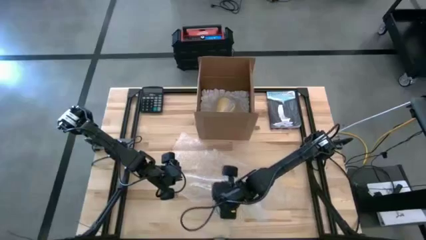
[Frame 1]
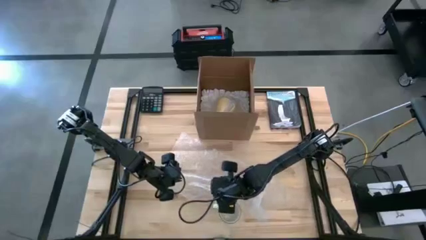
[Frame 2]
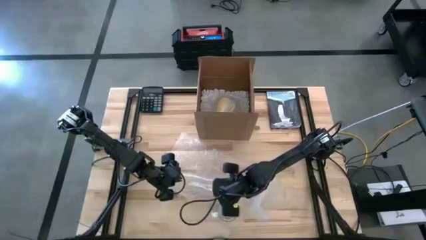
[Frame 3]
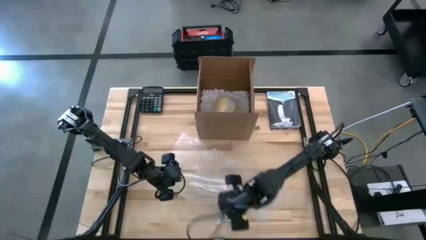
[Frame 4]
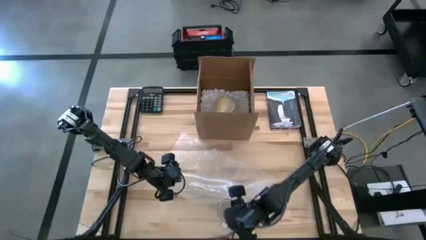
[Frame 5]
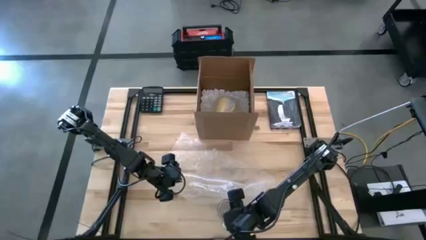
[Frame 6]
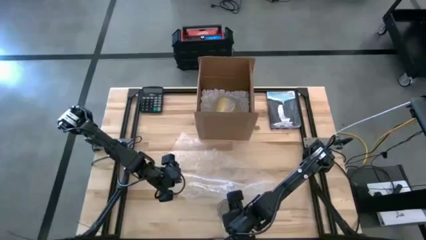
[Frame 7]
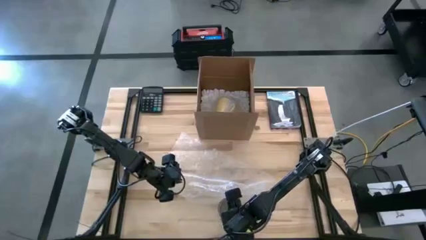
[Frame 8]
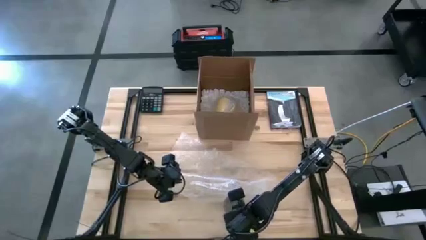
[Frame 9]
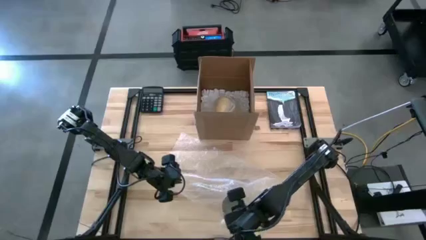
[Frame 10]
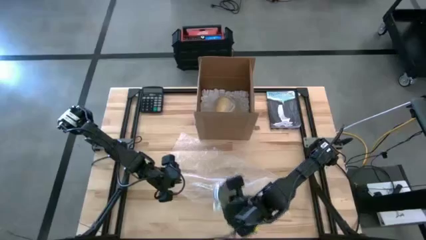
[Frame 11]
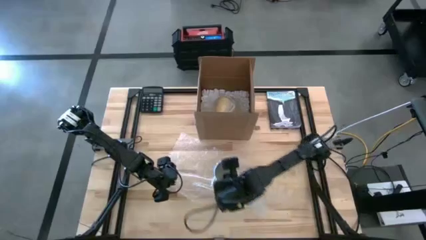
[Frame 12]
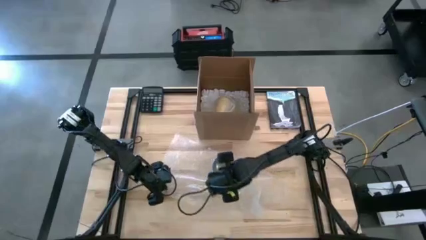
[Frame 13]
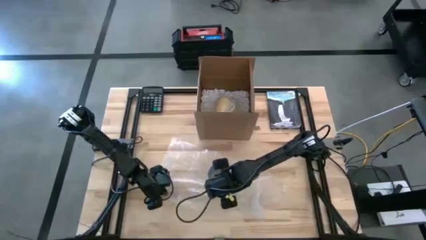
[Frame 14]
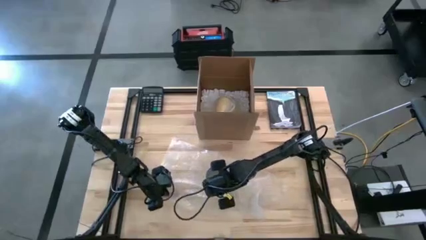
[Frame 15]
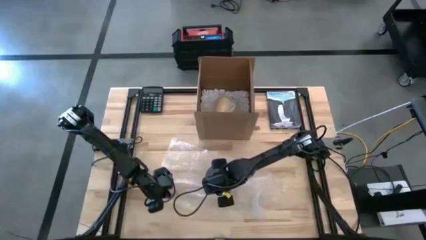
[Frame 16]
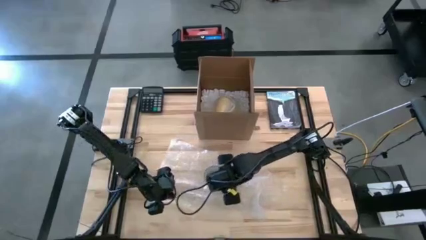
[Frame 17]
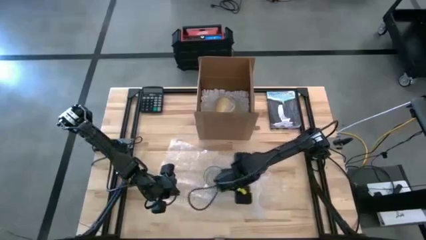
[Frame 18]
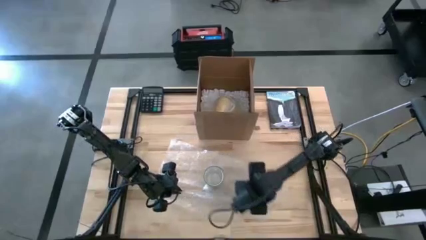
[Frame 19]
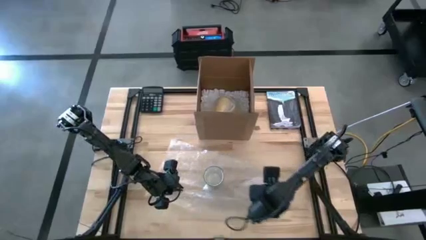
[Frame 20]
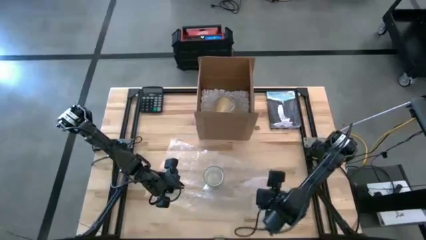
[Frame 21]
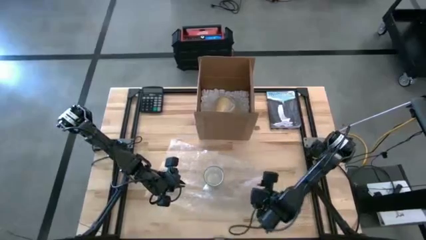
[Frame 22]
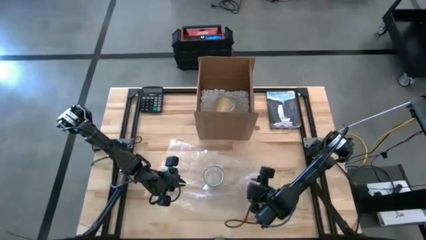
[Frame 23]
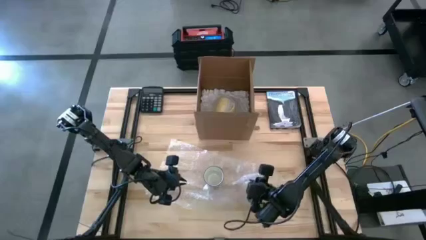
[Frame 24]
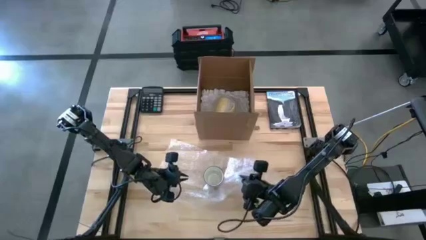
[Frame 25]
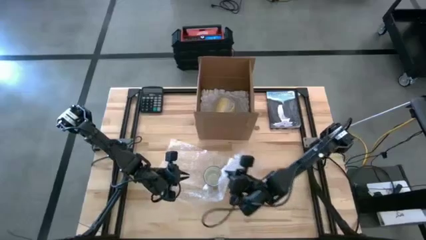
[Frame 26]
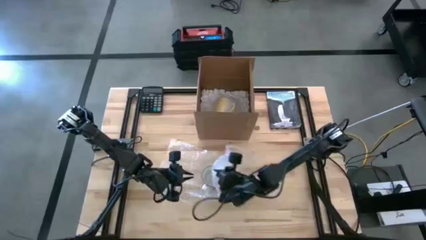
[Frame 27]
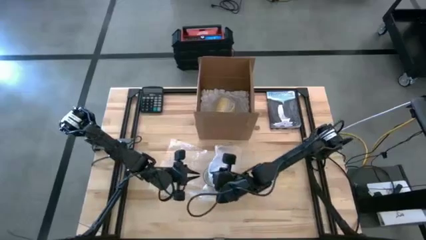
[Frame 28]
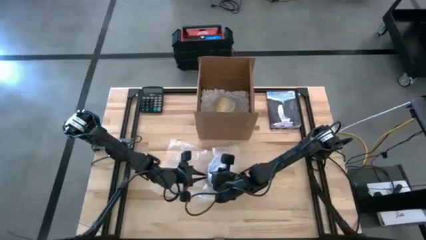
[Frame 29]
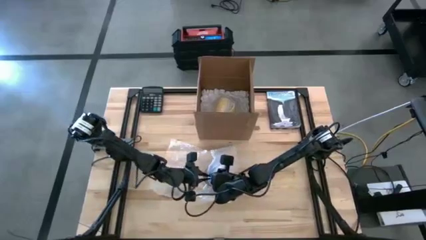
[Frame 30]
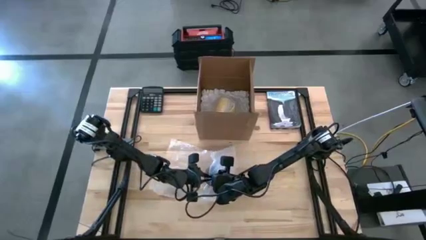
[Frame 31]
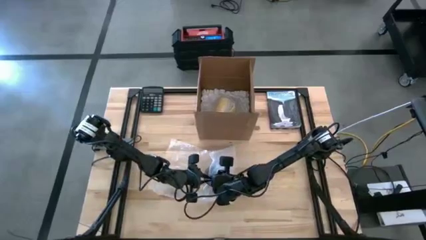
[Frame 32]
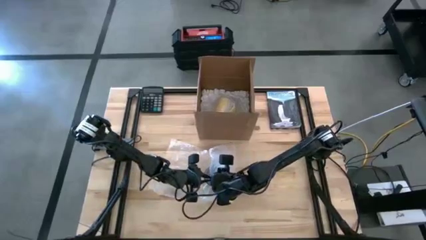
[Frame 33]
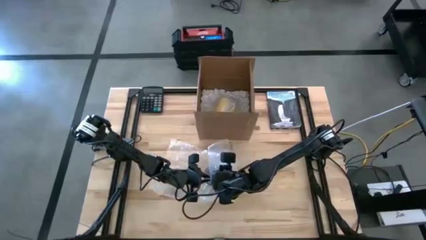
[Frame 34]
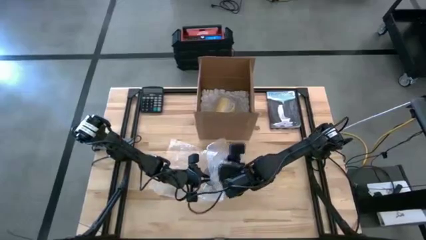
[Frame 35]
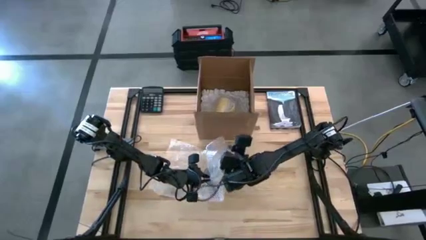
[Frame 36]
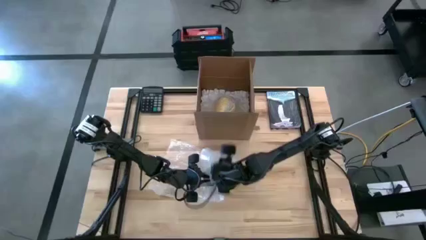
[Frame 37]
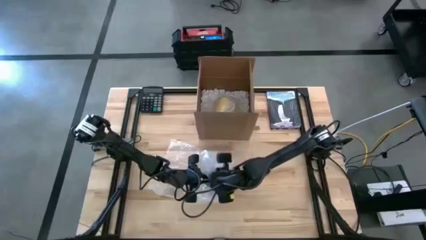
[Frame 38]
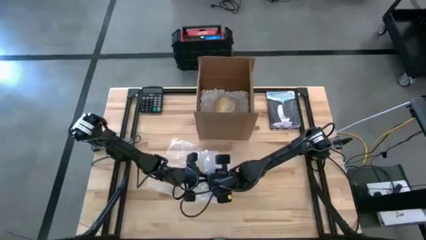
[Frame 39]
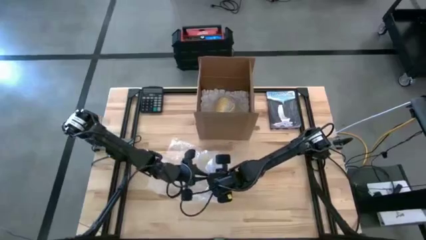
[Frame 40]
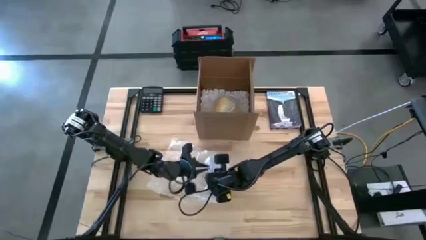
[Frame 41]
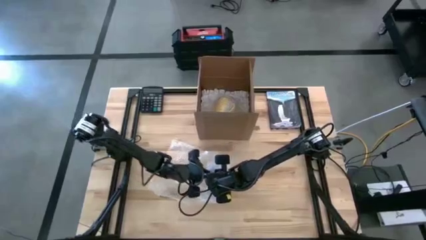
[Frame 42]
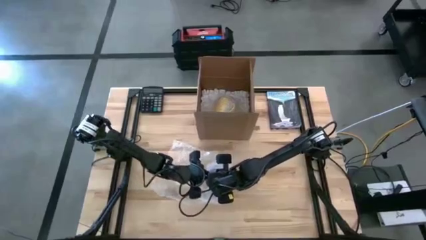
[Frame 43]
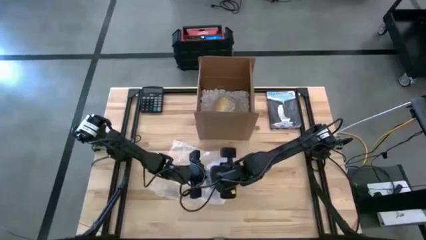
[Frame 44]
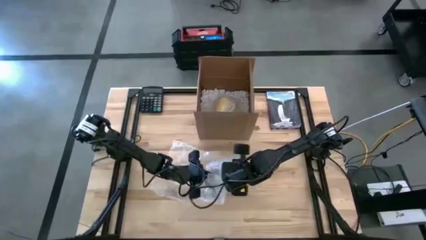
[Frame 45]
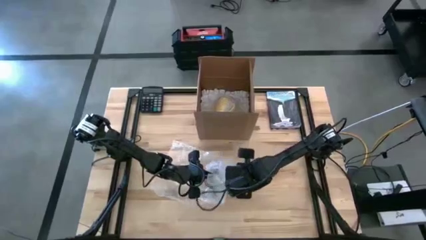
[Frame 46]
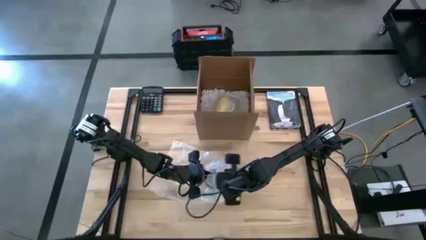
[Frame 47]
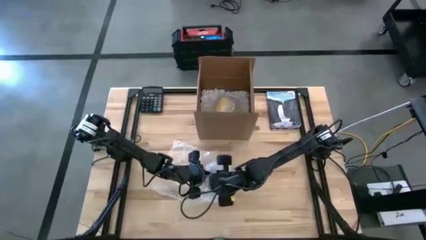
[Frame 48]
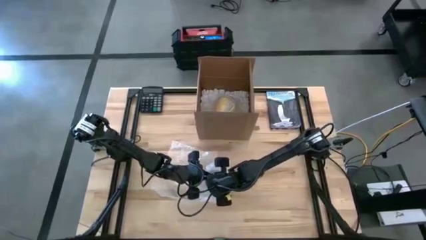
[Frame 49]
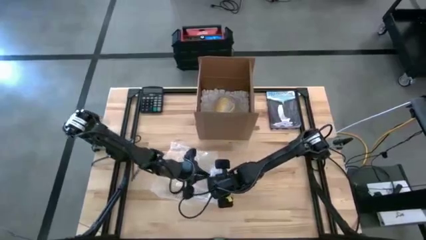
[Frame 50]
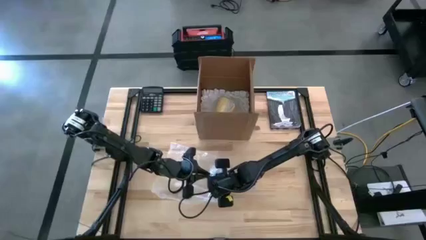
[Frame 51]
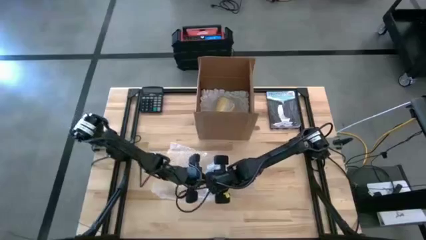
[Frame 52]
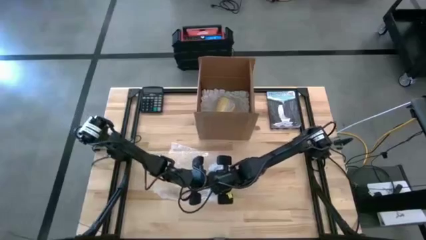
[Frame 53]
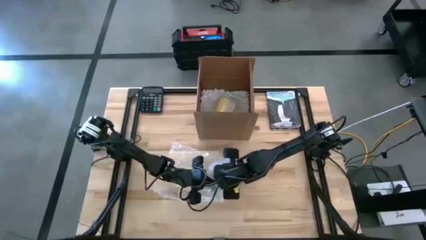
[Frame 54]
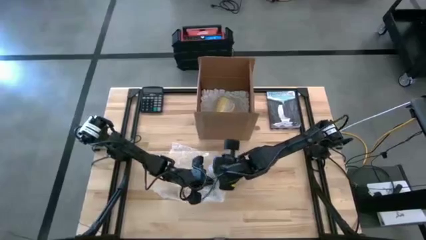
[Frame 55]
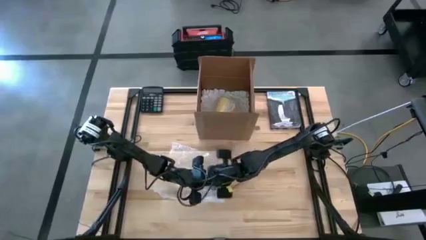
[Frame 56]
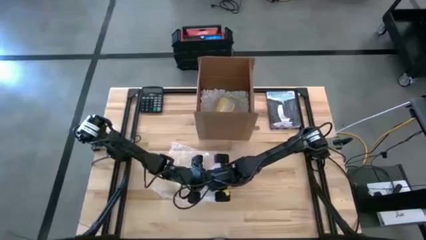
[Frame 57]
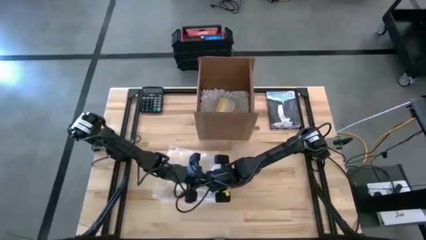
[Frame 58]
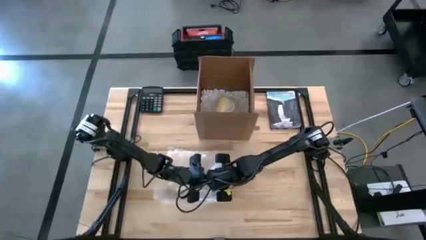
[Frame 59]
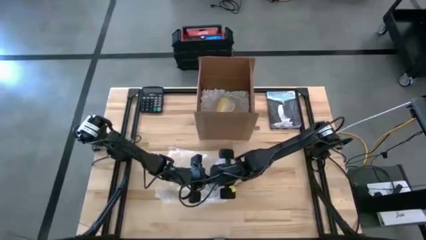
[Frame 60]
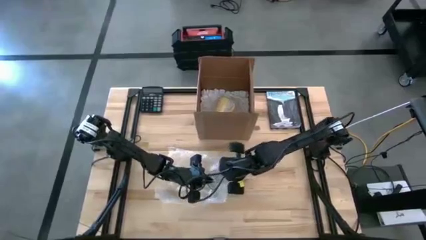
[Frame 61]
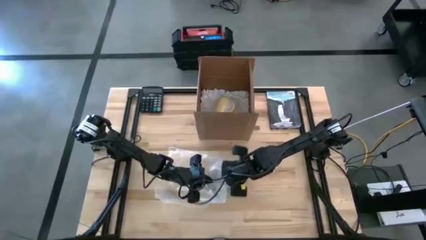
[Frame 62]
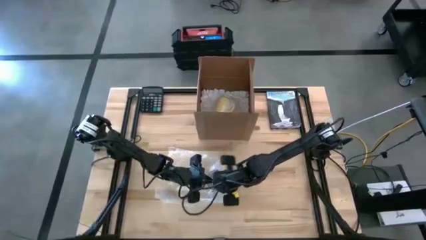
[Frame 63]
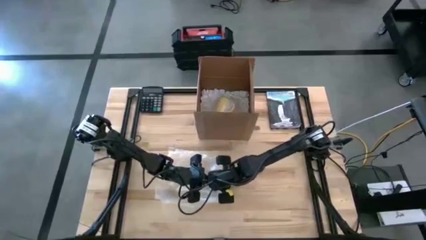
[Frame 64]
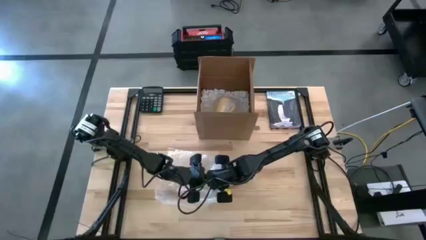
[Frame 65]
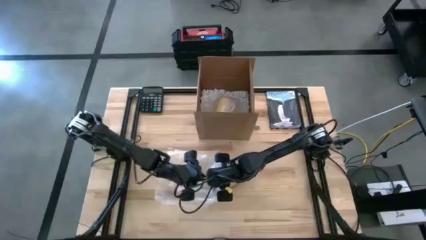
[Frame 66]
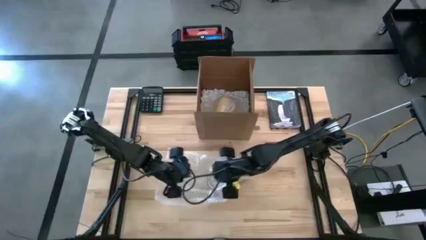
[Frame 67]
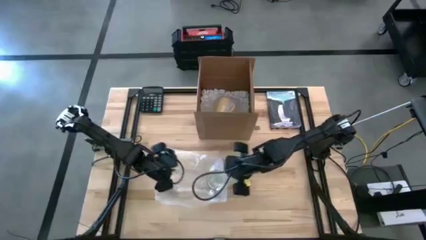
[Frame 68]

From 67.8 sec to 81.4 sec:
Task: wrap mug
Wrap the blue mug in bubble wrap

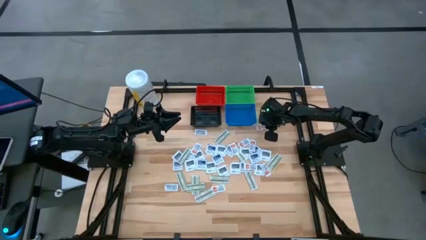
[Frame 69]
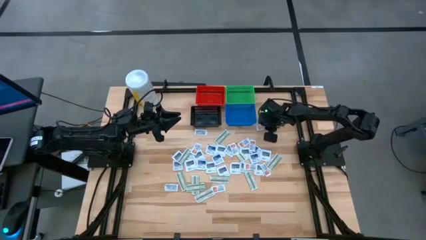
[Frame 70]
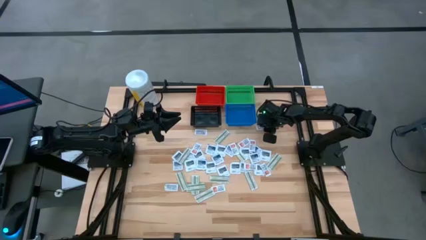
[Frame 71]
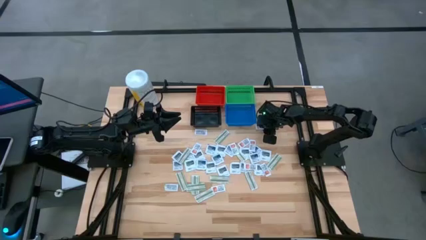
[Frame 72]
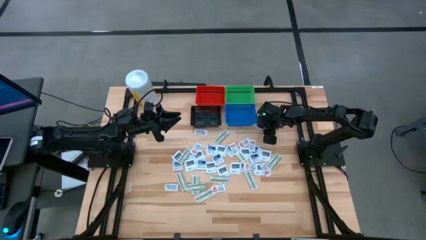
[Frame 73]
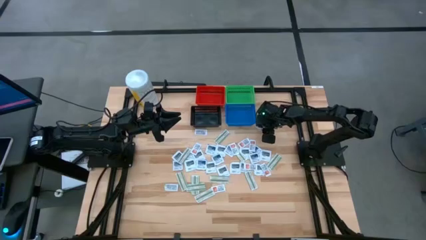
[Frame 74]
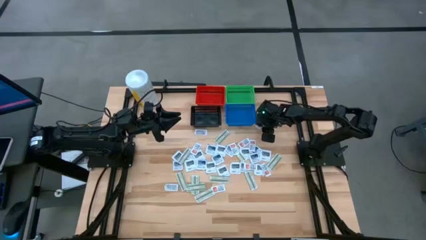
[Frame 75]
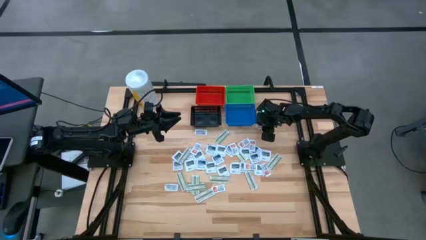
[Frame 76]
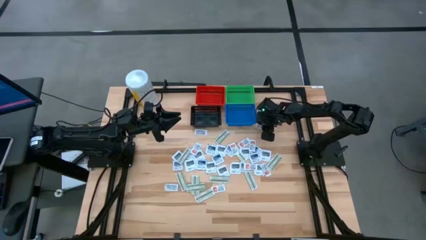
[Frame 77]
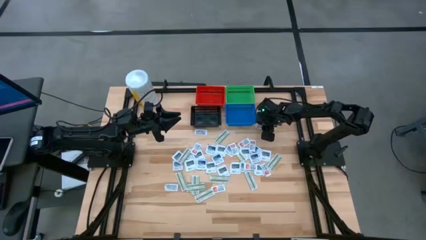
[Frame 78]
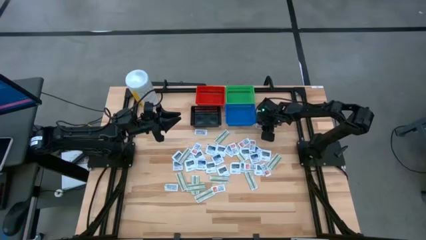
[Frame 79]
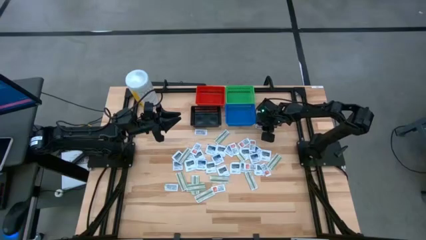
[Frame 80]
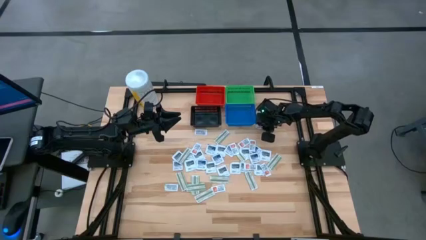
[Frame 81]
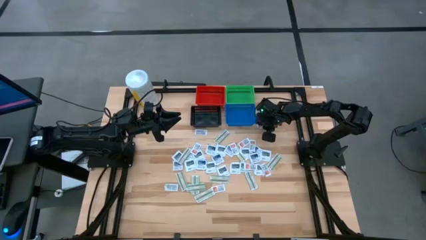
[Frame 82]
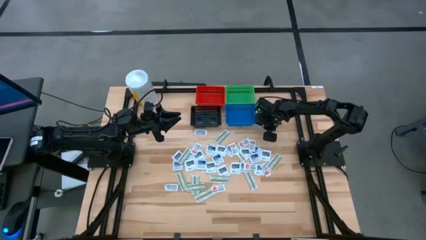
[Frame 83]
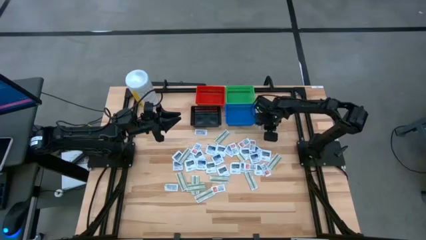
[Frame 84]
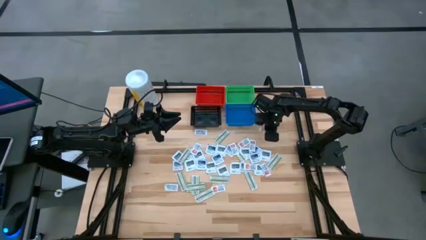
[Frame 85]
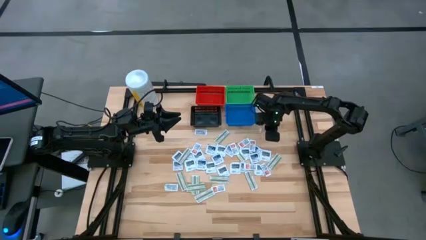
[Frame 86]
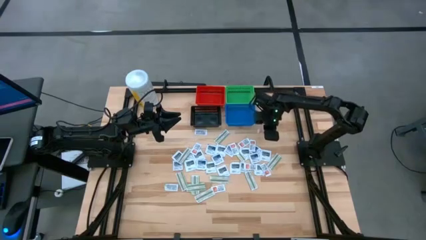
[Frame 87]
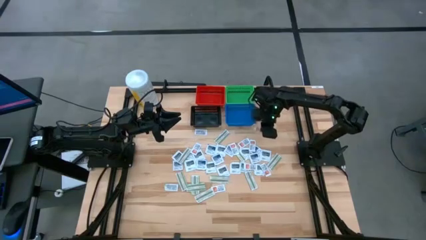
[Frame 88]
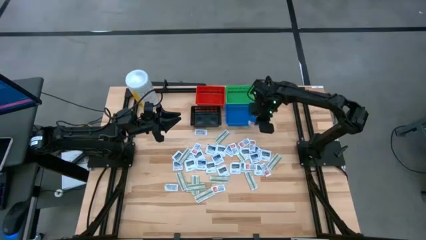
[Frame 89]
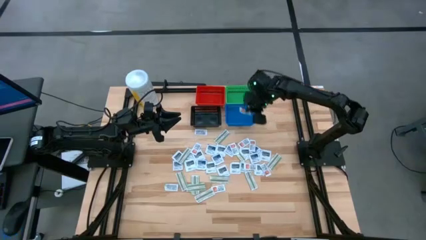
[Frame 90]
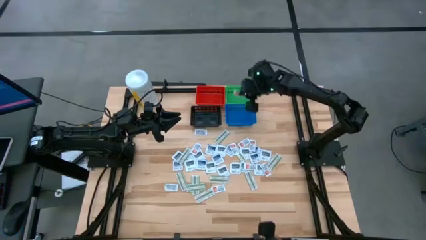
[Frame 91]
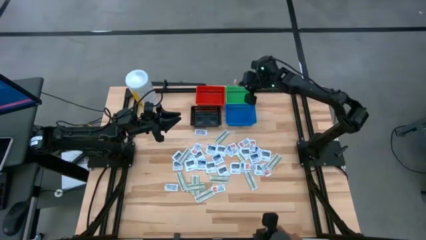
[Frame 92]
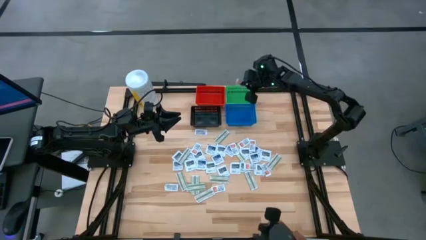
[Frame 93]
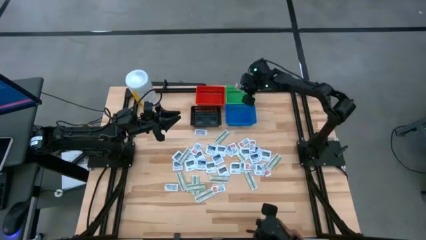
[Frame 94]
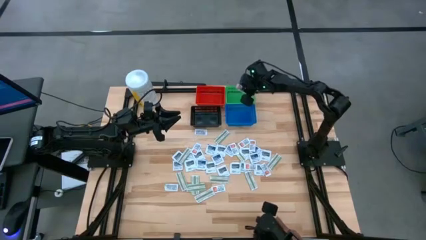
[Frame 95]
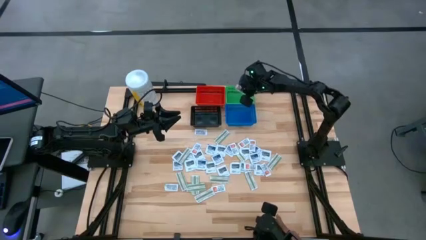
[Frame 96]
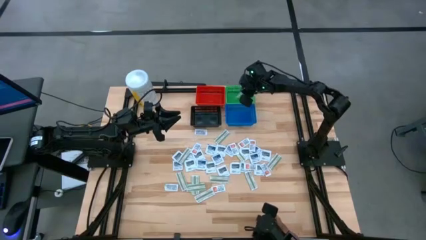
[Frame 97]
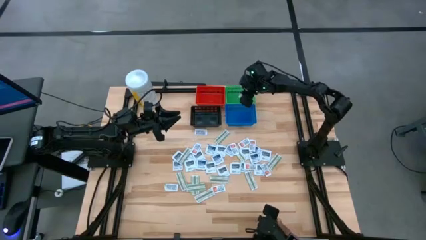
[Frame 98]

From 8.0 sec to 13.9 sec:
Task: Pick & Place First Aid Supplies
Put the ointment pack into the green basket
